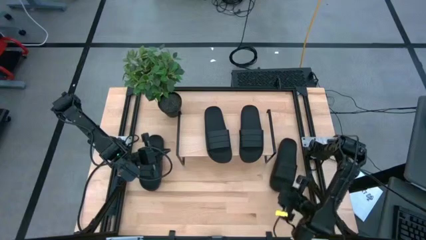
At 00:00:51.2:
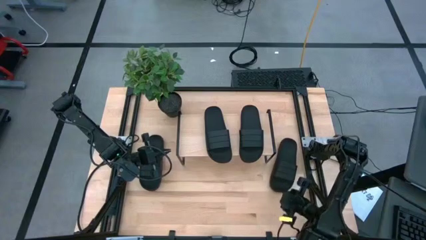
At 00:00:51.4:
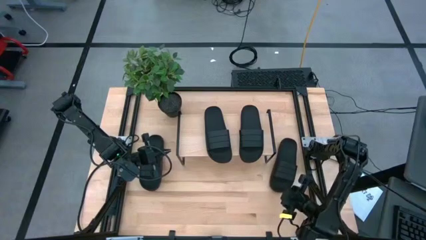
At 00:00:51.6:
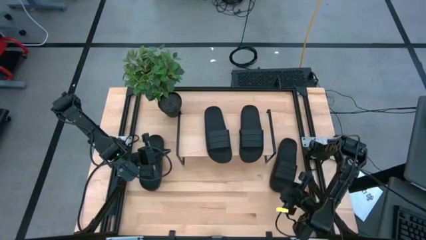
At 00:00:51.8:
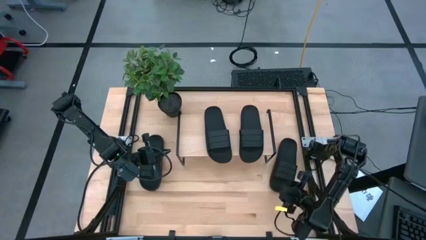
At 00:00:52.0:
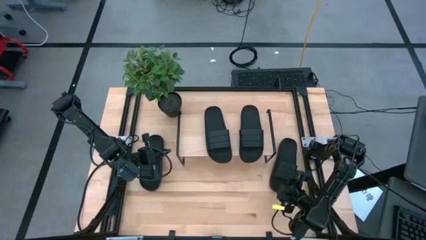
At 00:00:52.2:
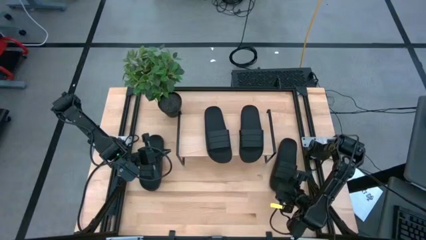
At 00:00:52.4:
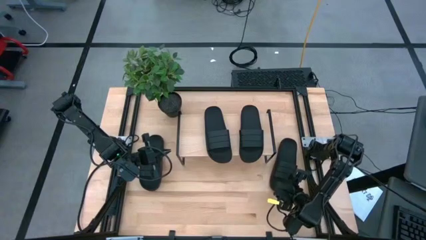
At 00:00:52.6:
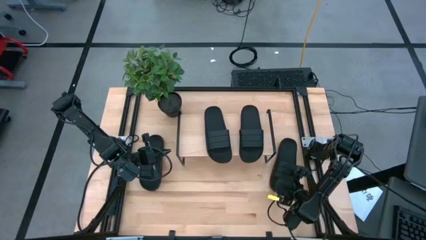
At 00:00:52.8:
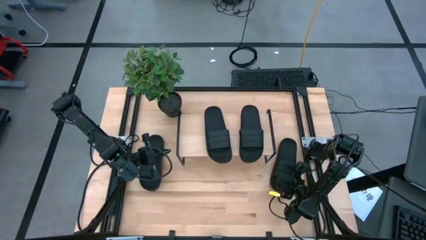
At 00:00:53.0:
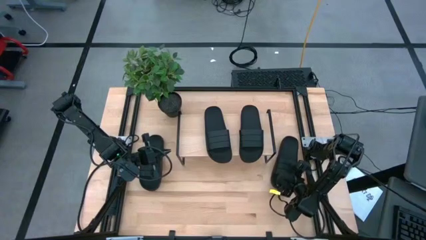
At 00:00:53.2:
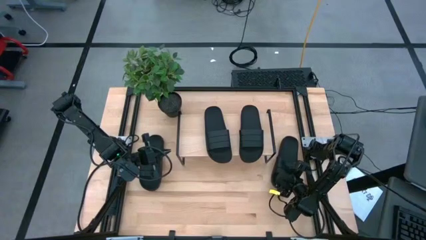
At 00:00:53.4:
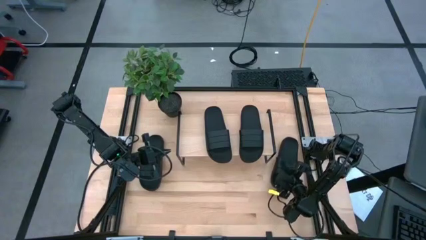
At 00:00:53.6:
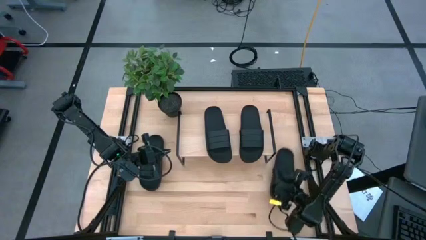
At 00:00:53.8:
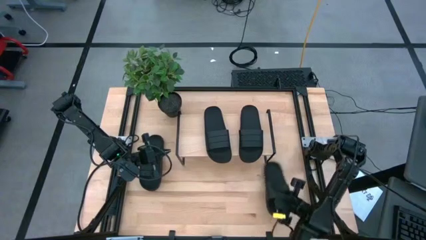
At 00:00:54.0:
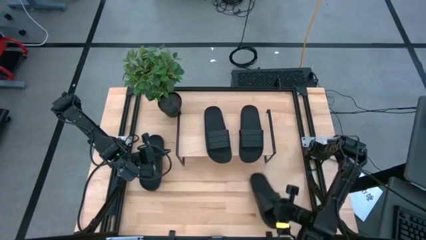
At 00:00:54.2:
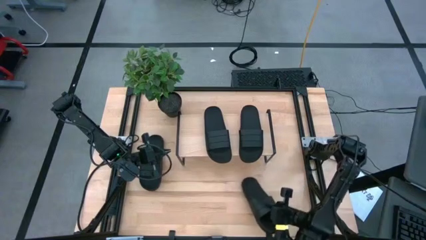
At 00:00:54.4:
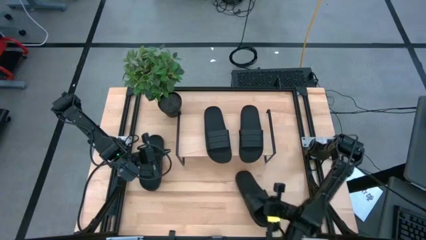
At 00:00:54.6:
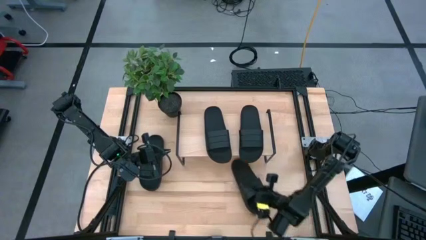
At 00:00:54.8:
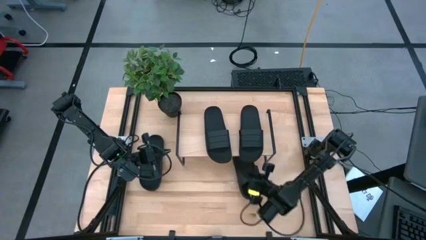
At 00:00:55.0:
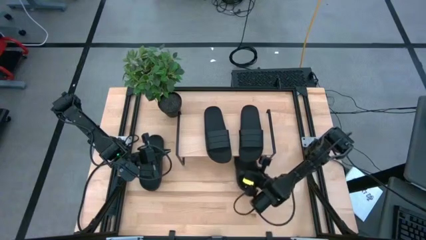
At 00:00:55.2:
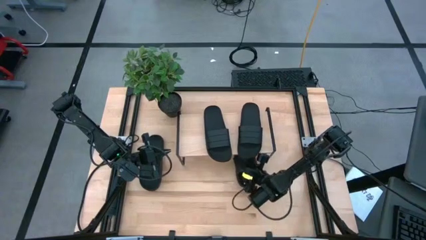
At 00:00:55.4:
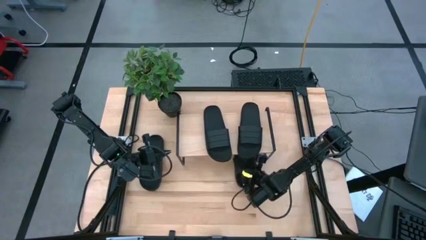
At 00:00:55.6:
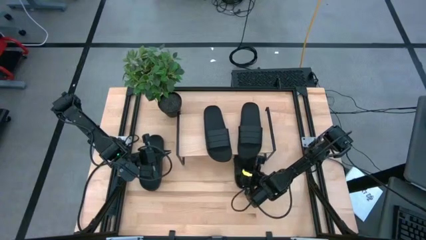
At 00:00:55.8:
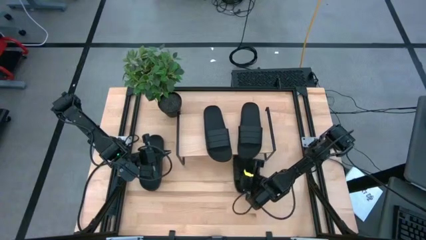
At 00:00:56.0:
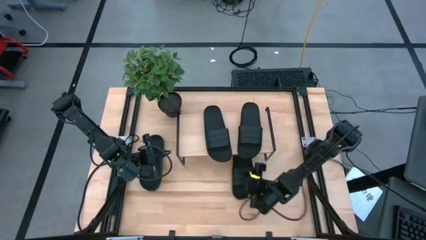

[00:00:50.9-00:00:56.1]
Task: Pick and place slides into the shelf
Put the right black slide under the shelf

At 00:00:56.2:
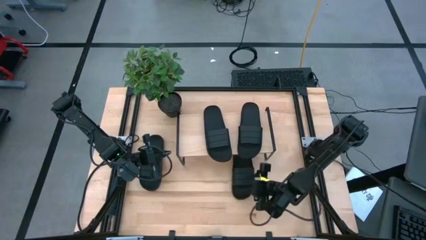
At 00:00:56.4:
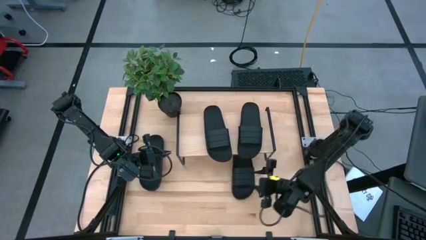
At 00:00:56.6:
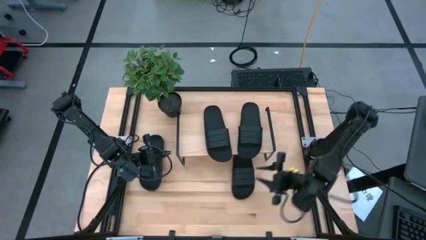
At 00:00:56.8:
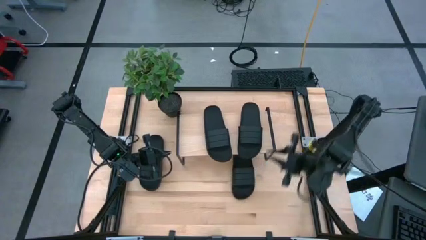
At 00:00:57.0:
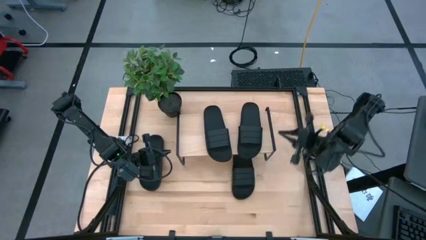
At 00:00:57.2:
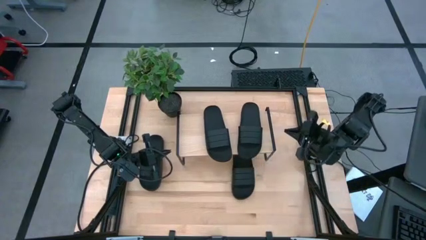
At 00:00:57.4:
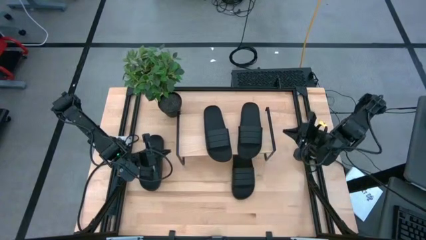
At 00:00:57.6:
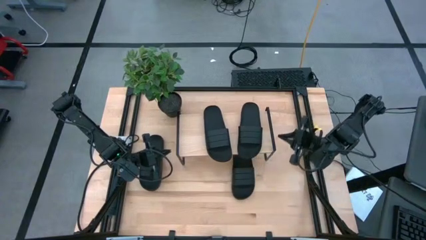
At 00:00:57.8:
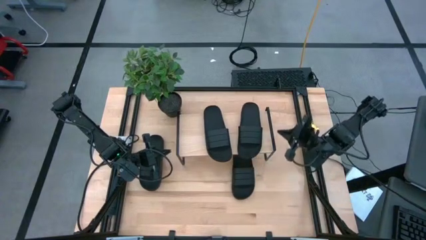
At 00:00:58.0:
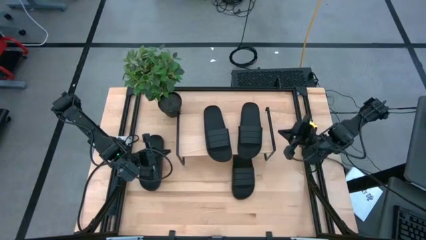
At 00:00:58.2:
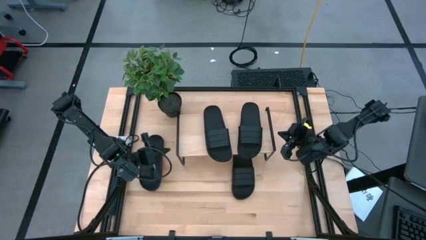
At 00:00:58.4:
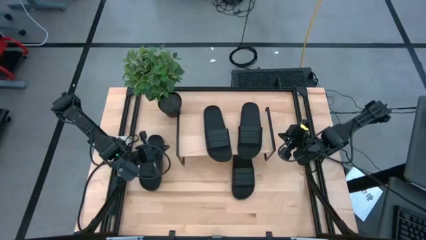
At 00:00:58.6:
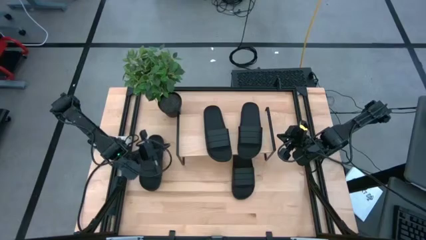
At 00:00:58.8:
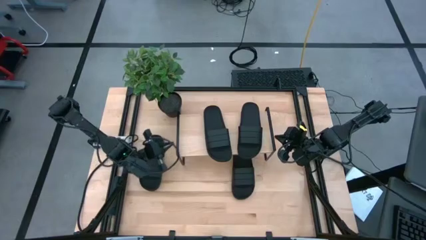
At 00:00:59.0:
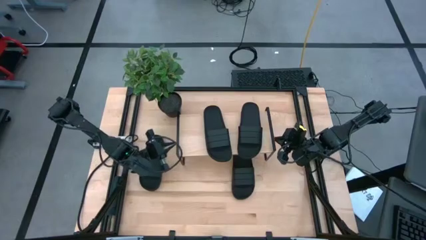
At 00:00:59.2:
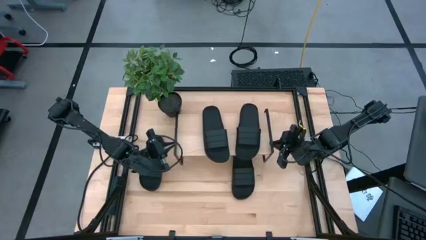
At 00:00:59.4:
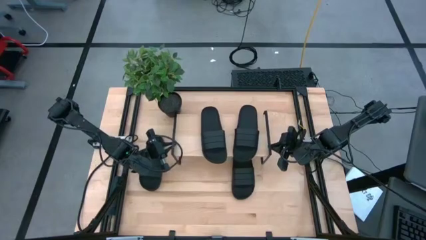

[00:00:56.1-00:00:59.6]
Adjust the shelf

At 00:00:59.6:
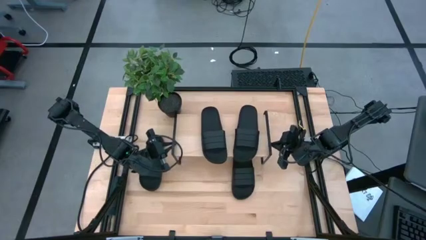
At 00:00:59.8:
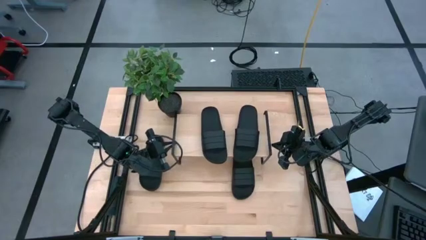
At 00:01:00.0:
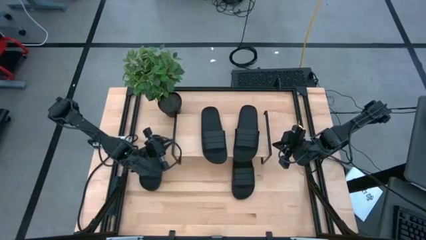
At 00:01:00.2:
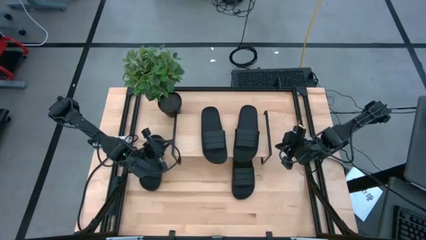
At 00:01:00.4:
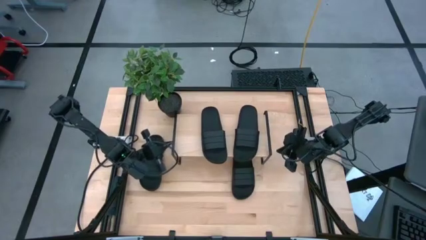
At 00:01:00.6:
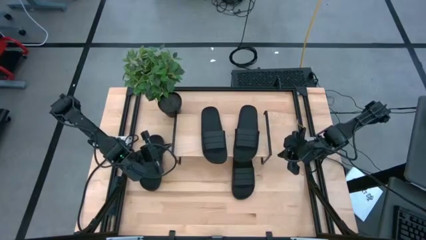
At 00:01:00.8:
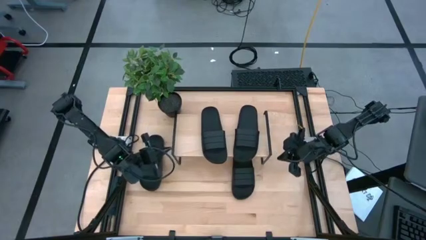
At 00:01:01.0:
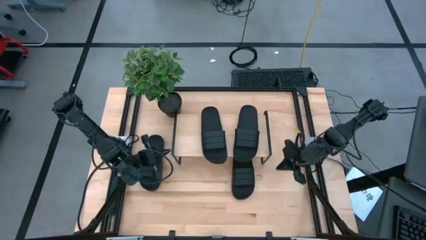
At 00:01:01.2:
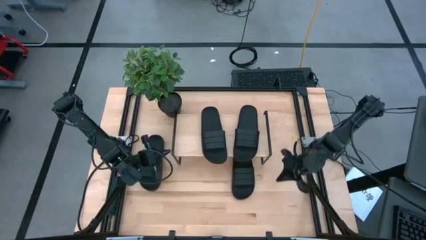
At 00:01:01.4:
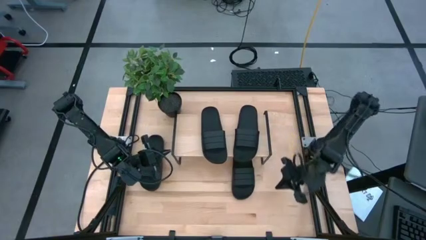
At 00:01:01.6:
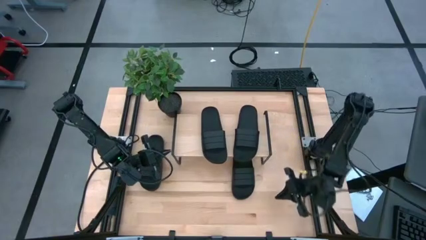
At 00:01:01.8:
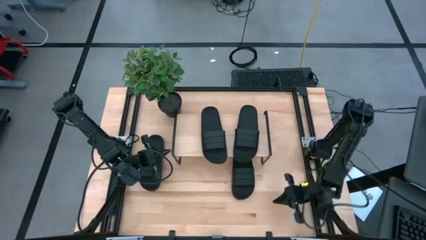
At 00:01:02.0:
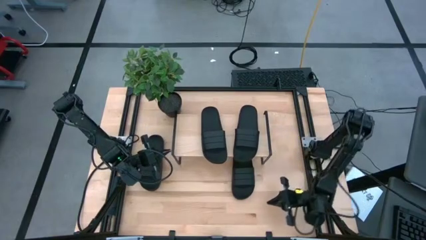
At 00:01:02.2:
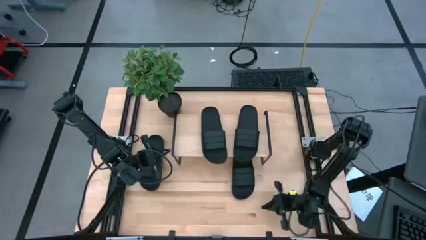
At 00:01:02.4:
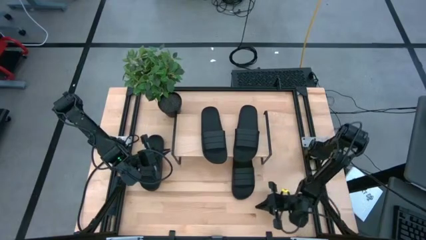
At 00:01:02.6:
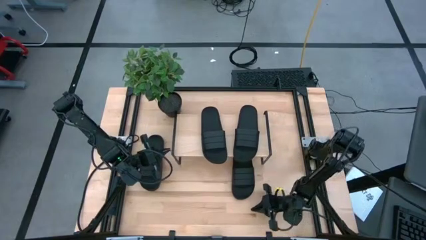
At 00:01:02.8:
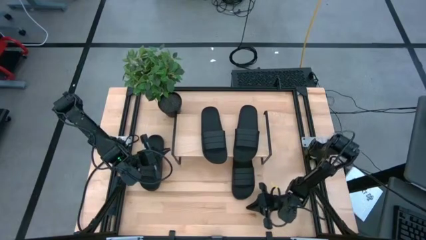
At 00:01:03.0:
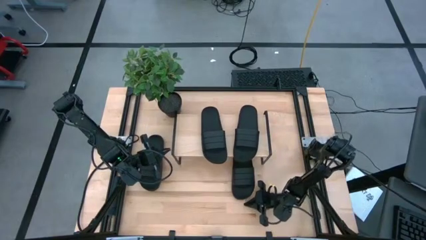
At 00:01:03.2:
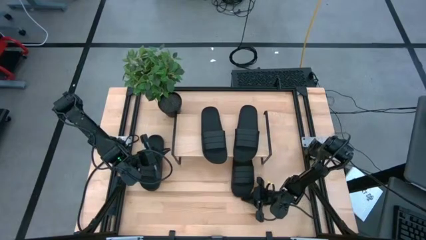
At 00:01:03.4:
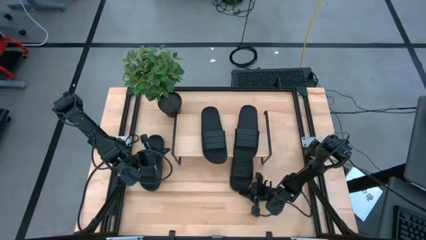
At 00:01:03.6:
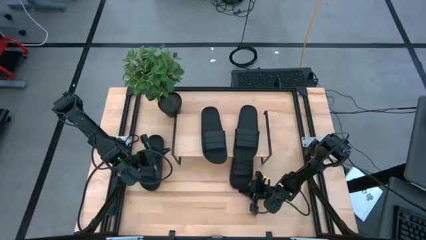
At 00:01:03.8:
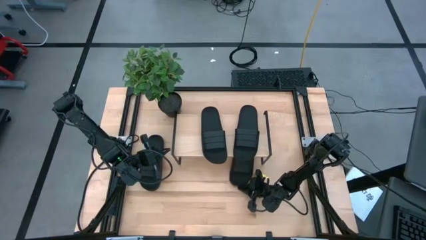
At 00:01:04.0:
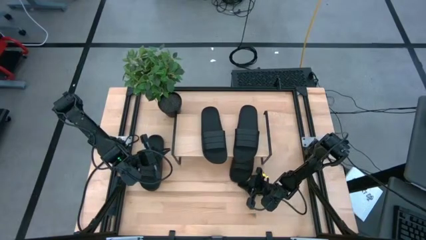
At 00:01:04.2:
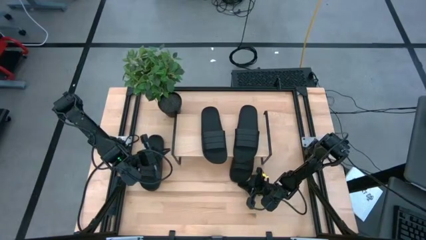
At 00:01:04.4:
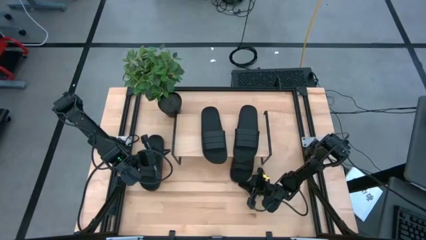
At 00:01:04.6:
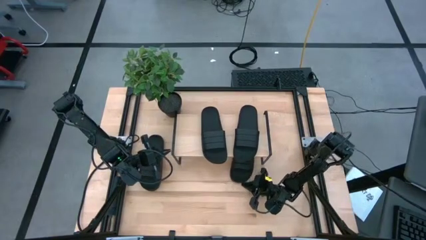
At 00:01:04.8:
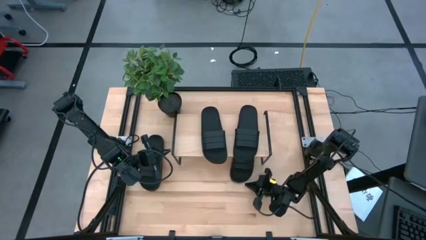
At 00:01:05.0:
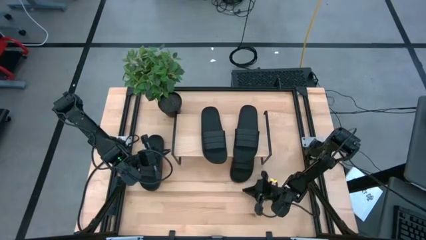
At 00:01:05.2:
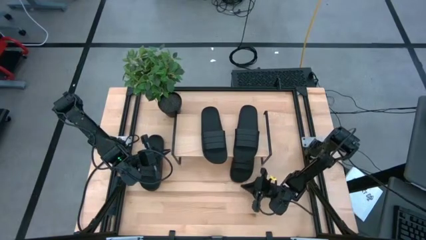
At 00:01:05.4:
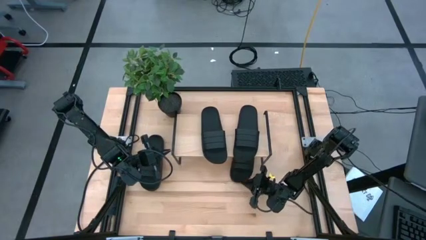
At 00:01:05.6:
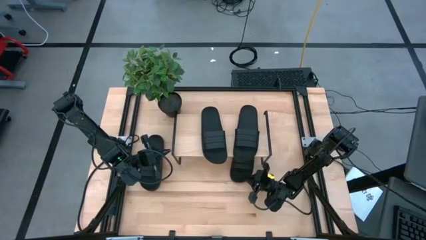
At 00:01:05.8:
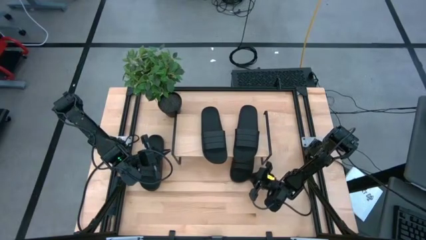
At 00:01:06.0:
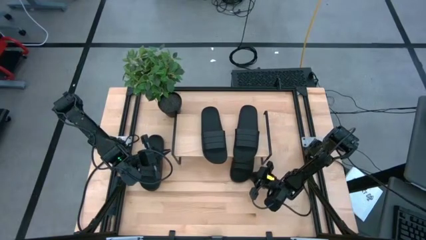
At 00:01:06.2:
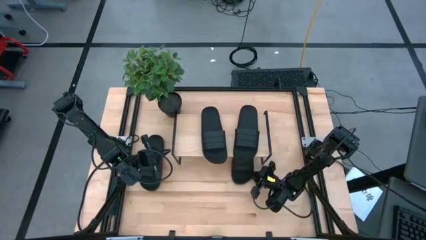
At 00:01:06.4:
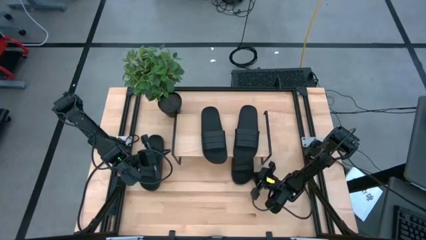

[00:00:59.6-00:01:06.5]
Adjust the left black slide under the shelf

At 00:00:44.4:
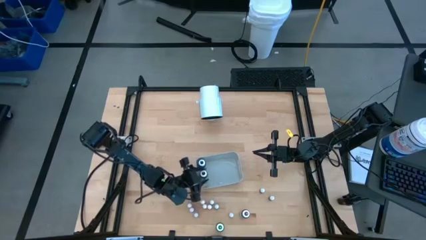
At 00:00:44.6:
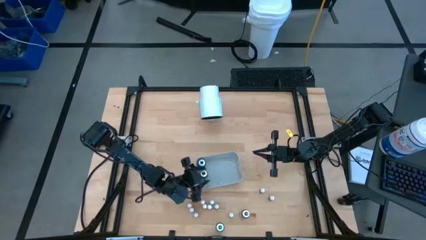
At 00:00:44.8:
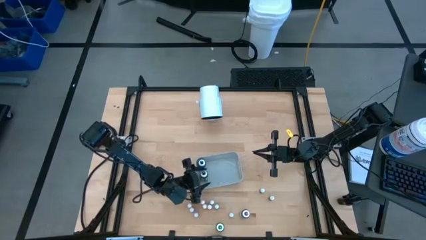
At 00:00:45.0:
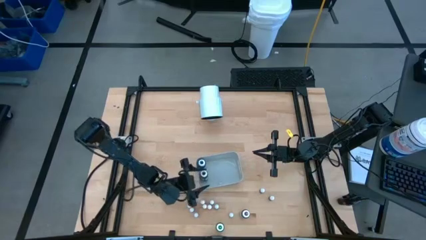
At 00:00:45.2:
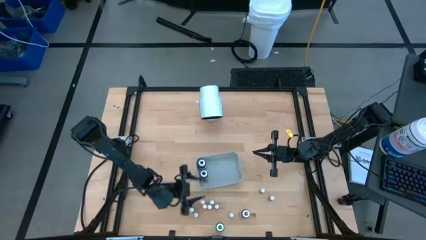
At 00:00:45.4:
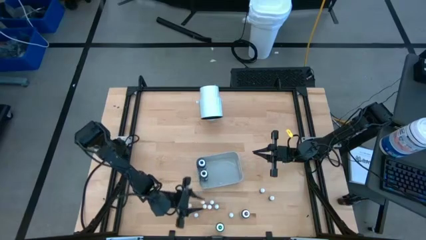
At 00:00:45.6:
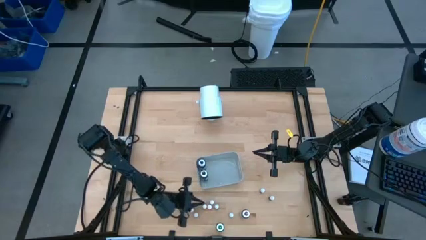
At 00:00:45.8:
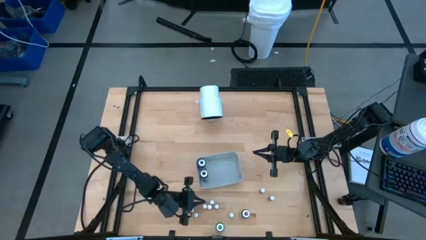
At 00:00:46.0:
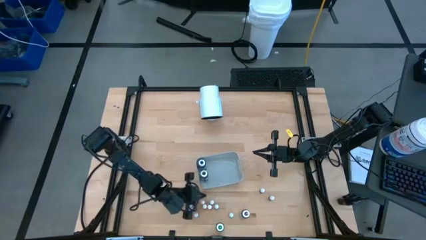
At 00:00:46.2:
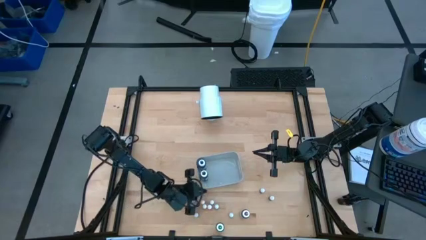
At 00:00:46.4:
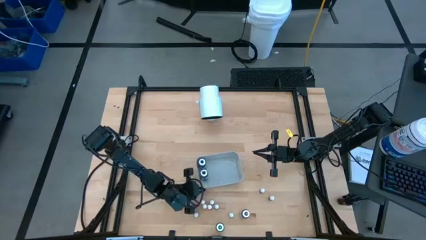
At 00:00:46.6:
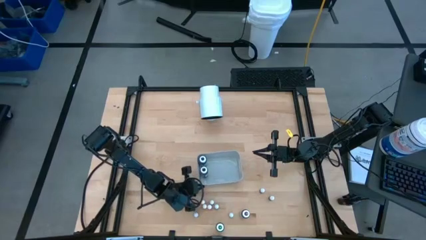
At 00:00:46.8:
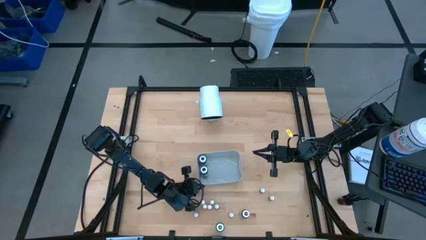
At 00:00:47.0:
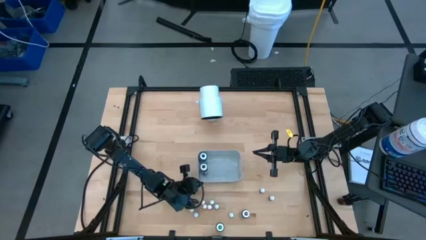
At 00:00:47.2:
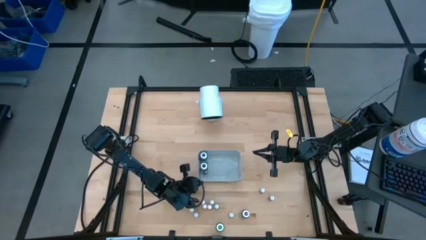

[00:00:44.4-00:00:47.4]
Task: Pick & Place food coloring
Adjust the gray bin
